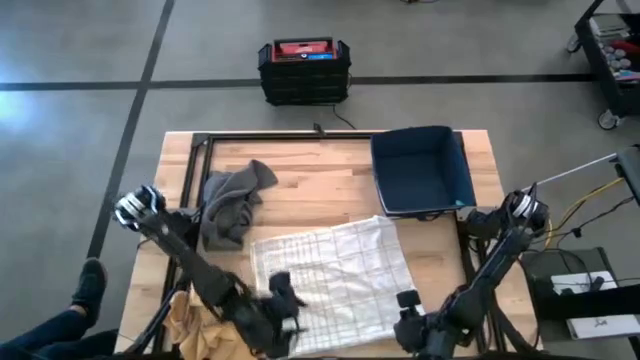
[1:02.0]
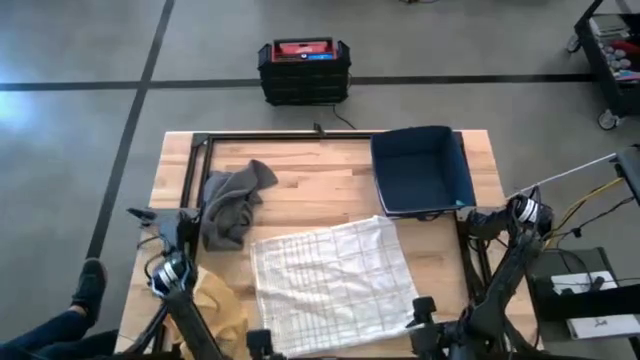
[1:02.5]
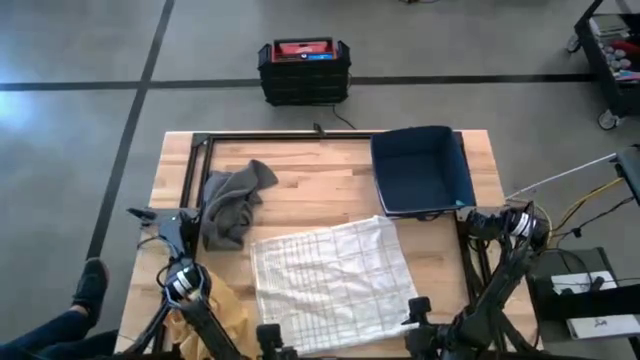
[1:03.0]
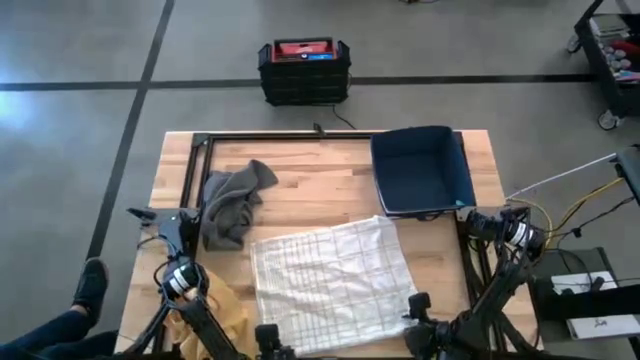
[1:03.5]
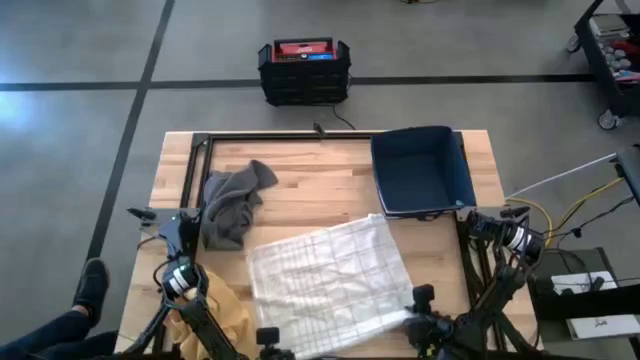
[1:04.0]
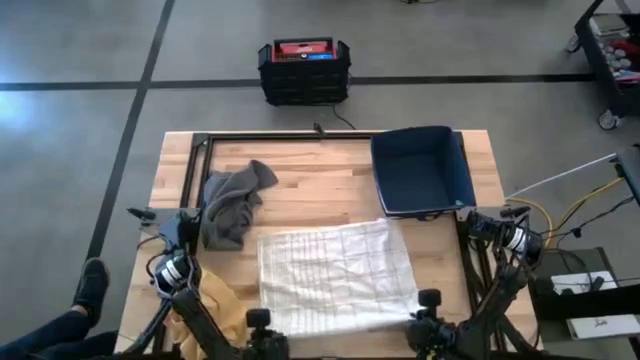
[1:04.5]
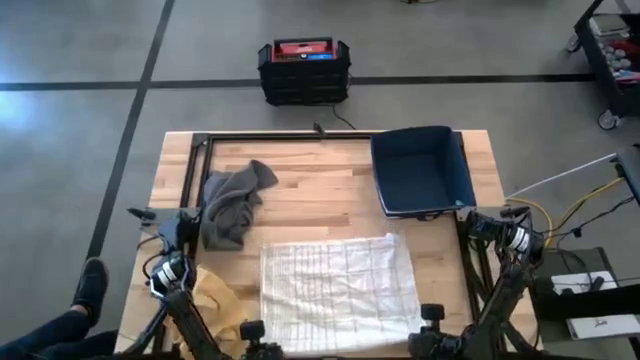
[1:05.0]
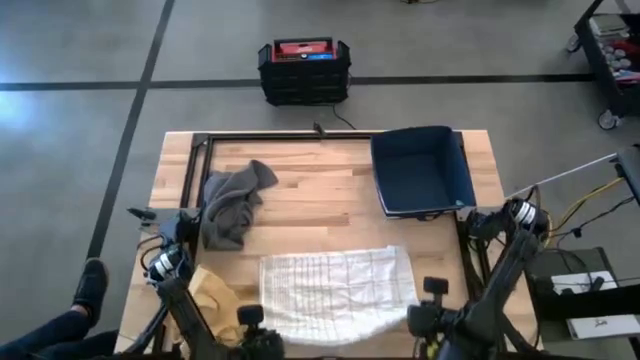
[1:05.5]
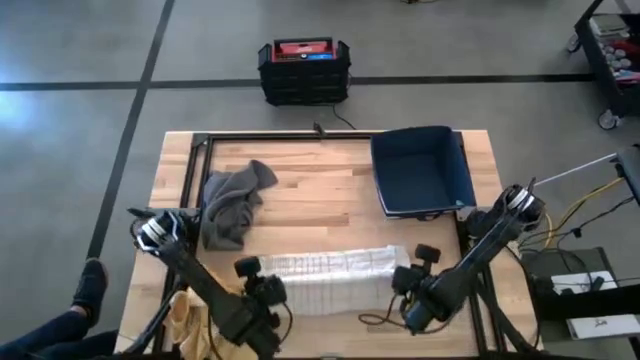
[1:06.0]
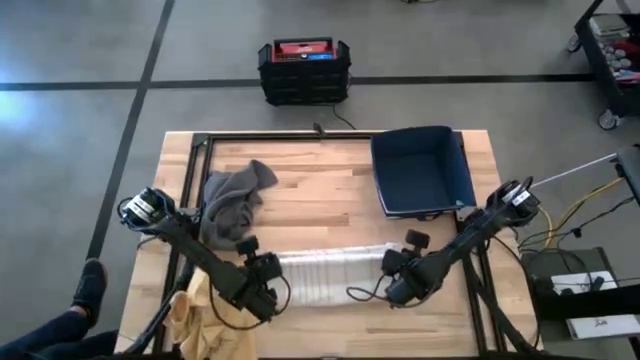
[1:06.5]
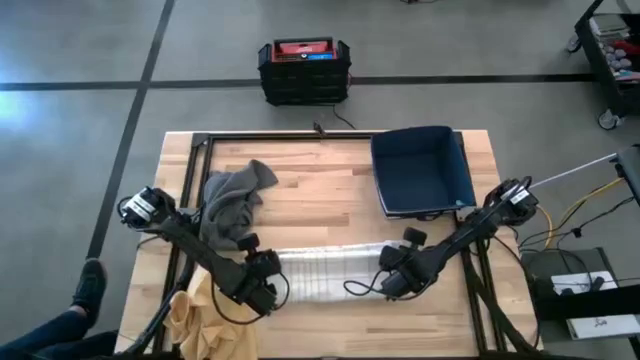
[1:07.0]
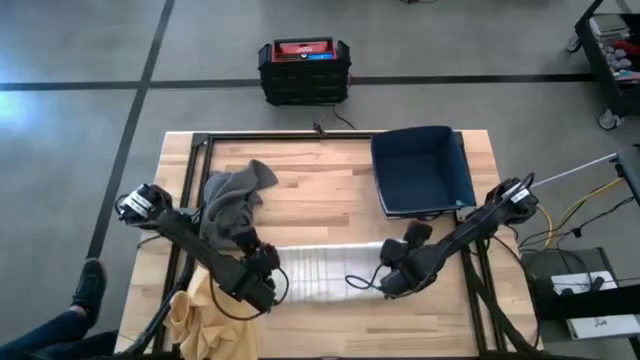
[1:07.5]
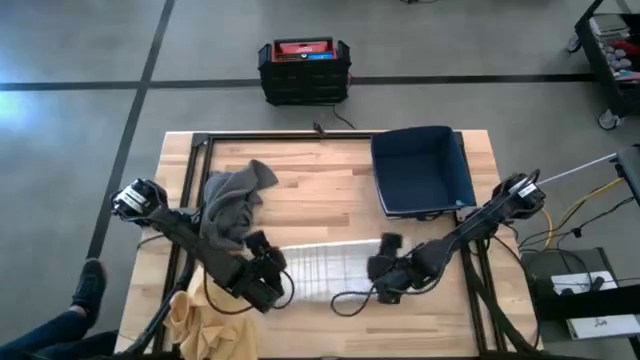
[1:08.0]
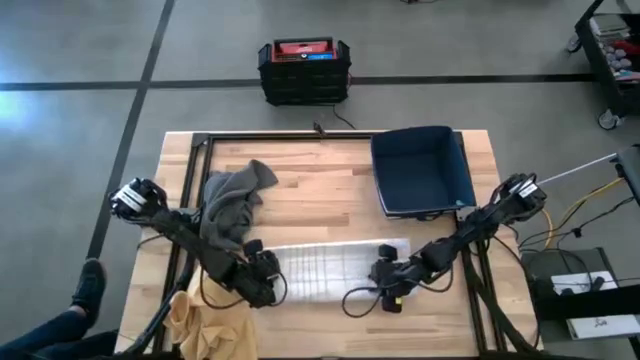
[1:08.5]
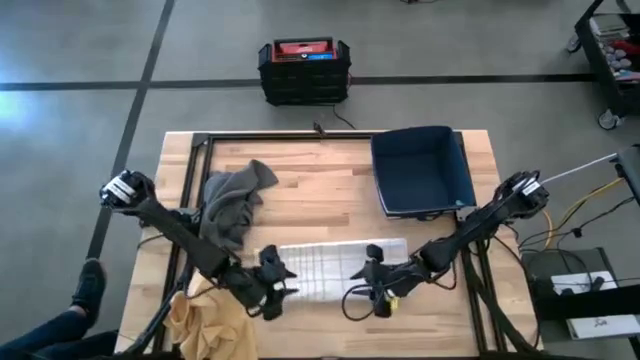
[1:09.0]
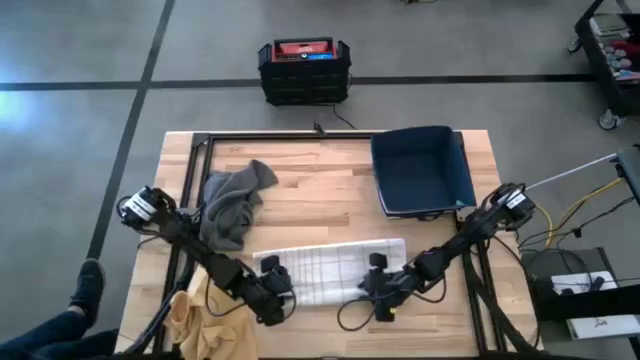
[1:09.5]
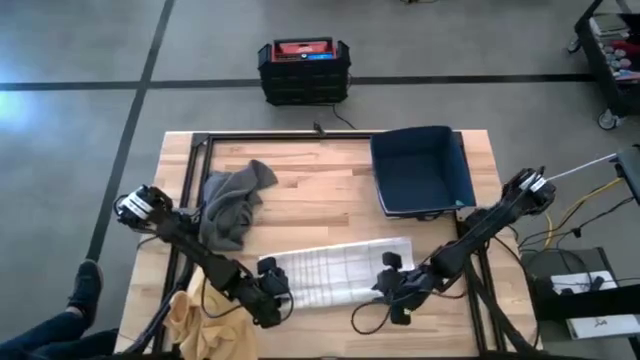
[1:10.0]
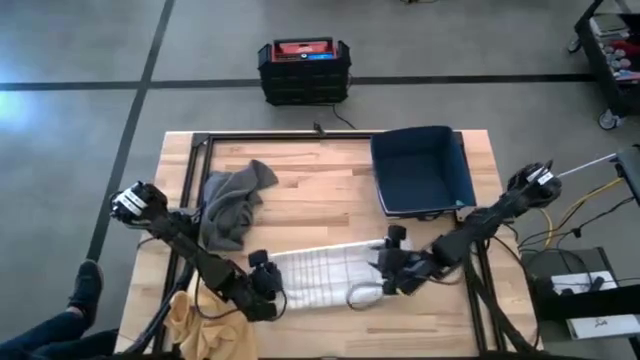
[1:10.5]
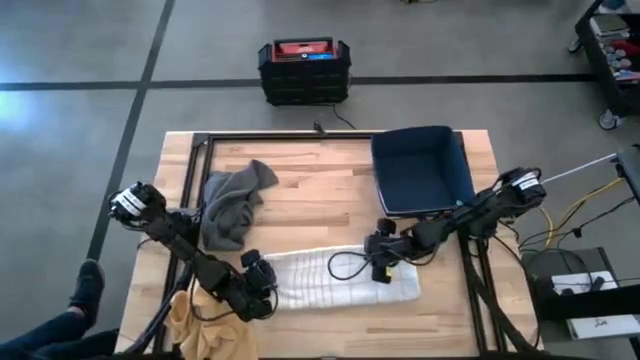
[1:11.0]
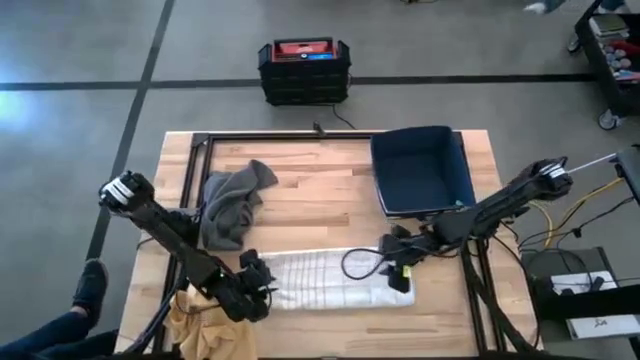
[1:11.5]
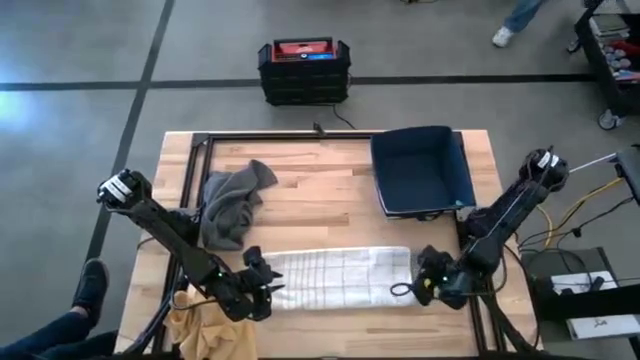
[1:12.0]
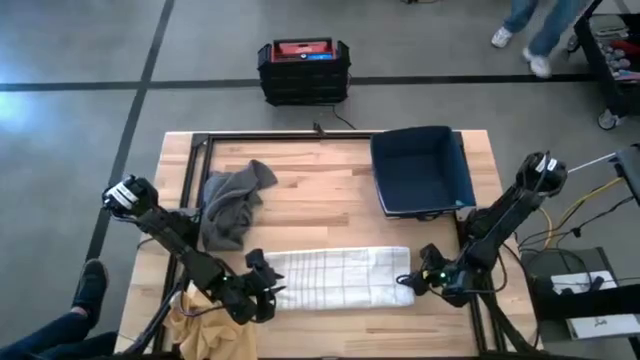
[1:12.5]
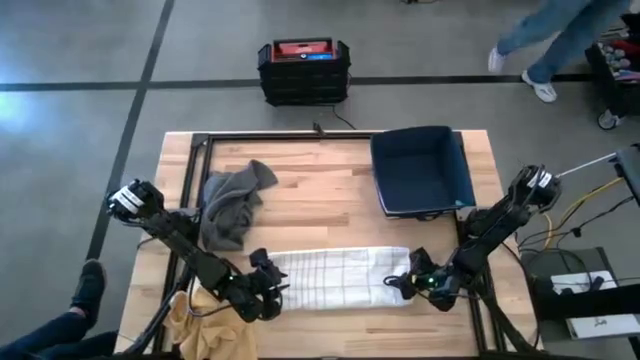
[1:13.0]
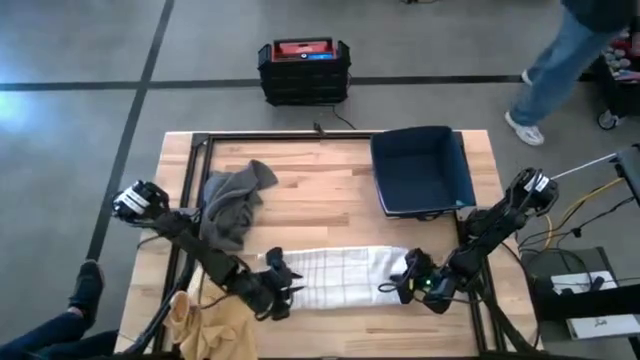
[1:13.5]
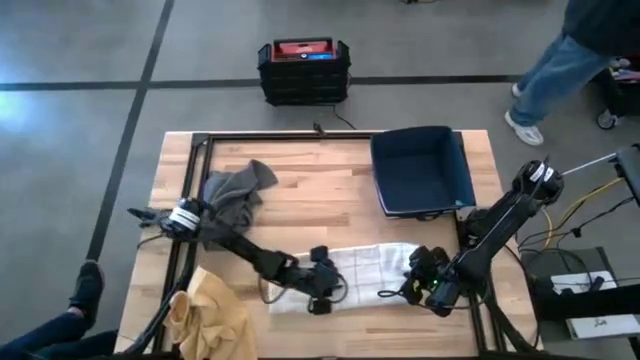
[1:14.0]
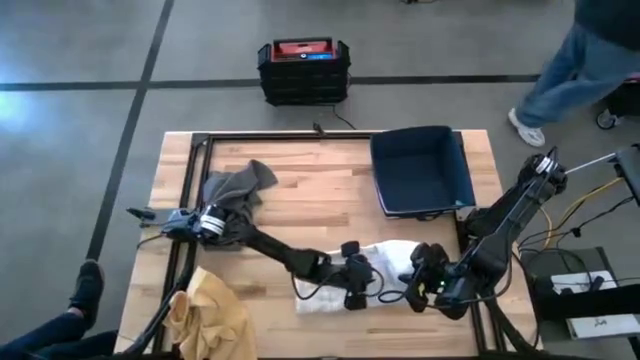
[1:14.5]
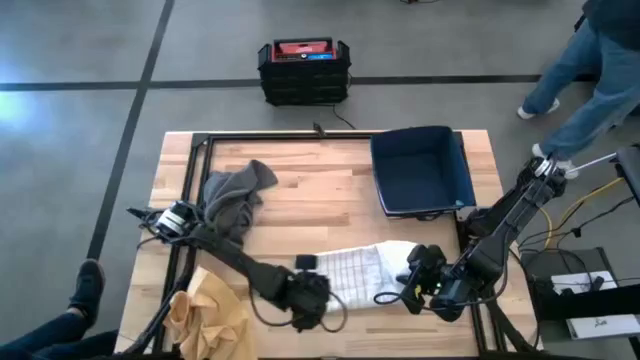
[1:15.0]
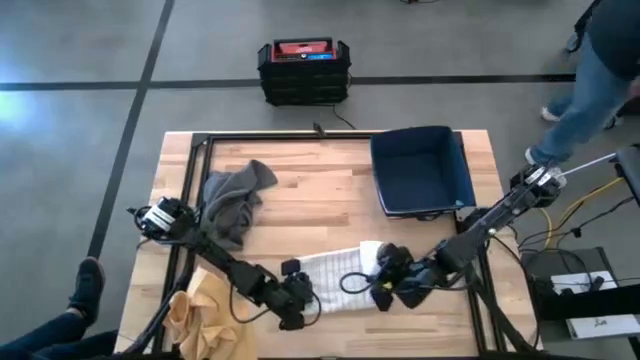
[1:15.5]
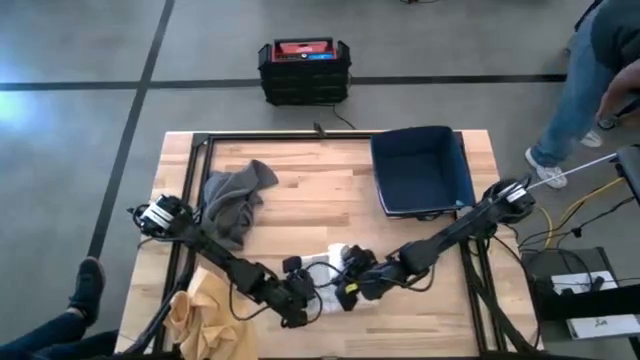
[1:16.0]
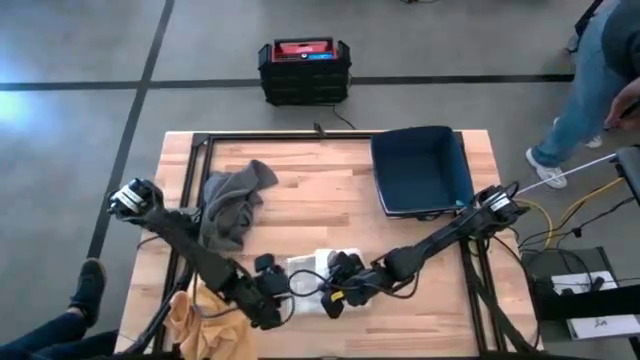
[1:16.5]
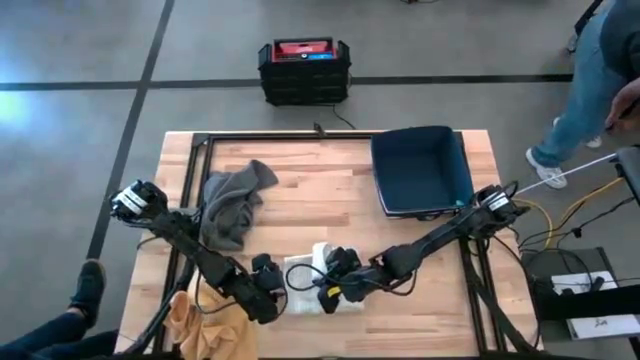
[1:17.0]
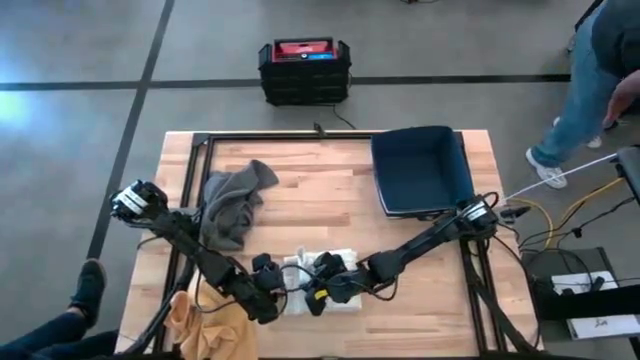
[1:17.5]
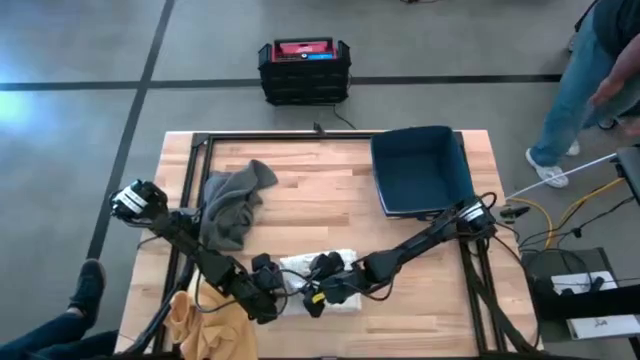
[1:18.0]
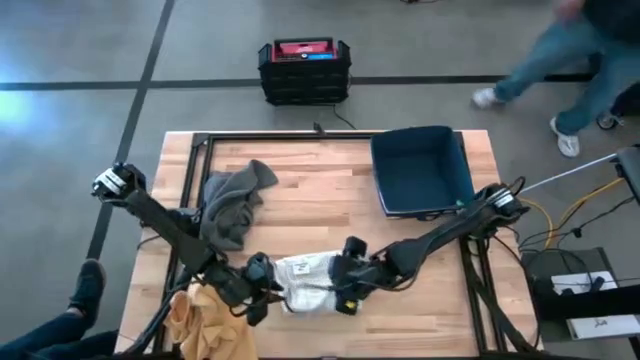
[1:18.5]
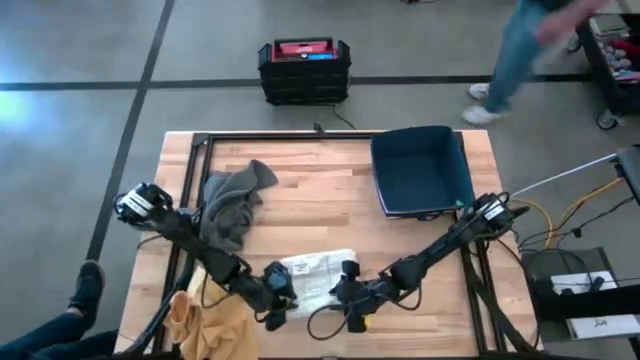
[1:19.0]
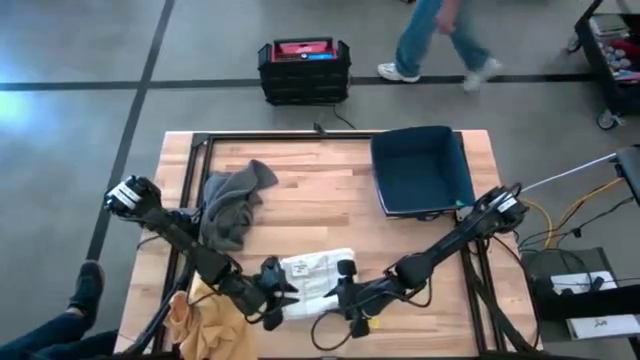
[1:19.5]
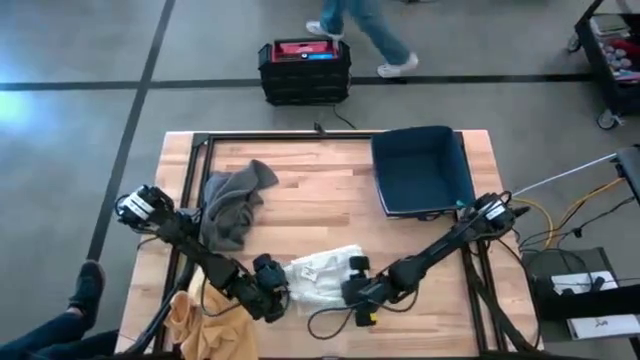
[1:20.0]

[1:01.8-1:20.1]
Task: Fold towel
Fold the white towel

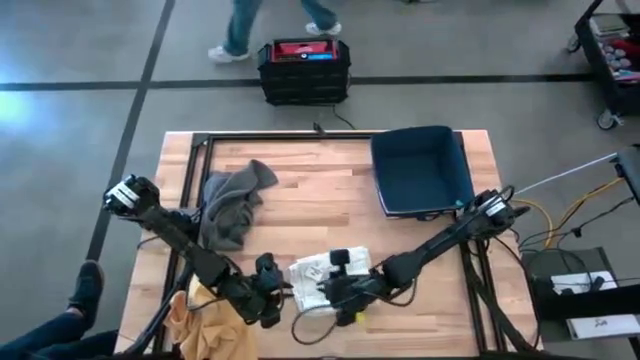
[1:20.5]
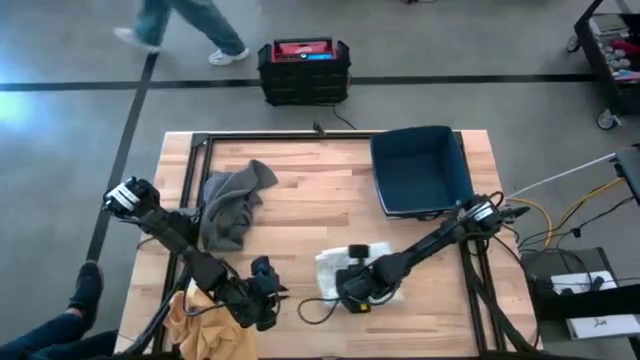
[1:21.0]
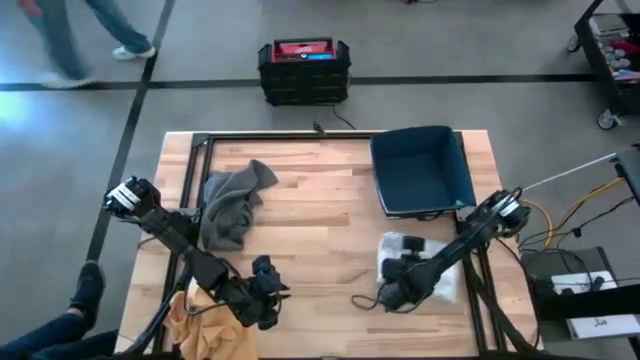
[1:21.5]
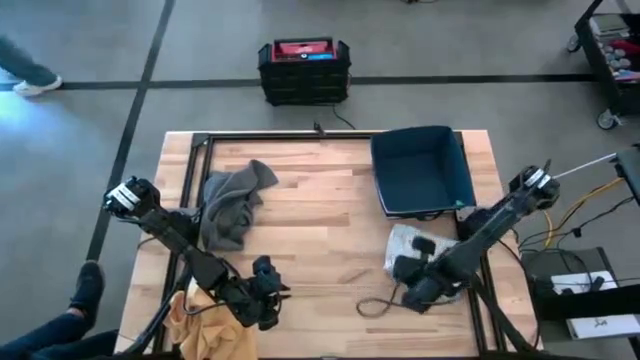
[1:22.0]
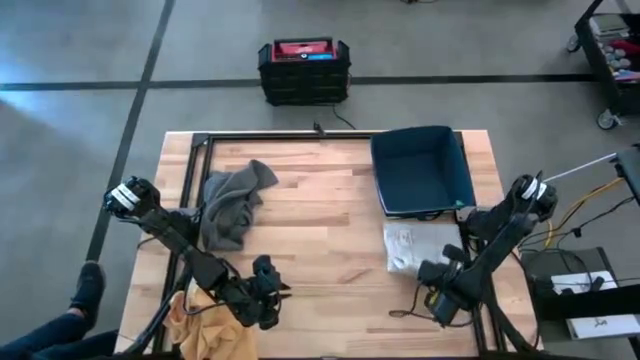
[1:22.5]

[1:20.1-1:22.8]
Move the folded white towel to the bottom of the blue laundry organizer

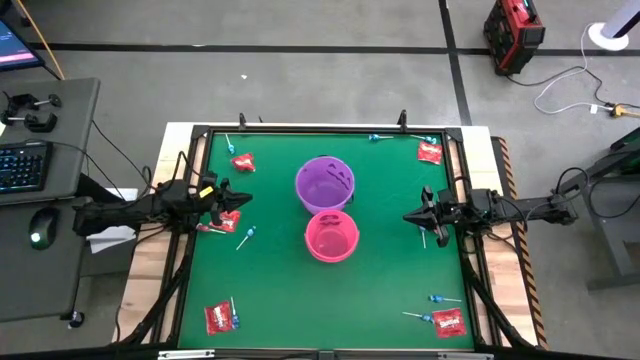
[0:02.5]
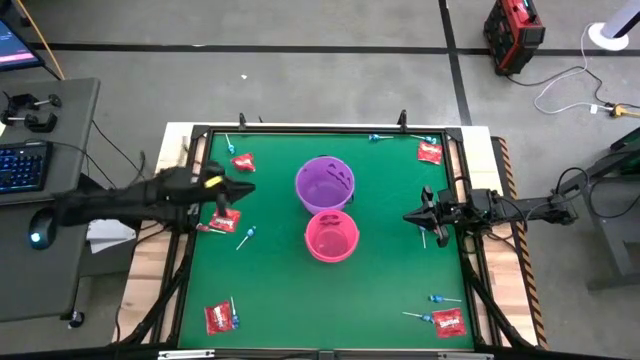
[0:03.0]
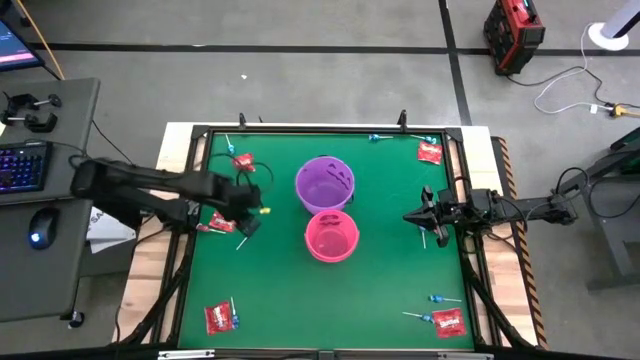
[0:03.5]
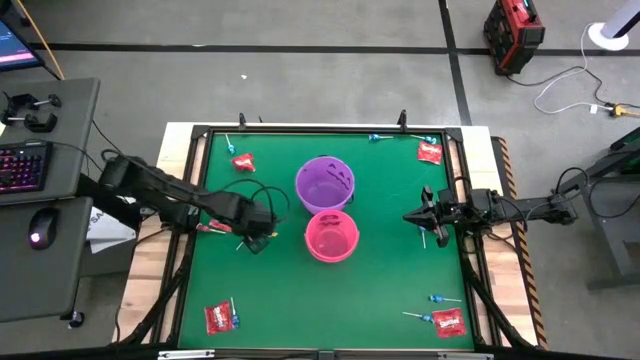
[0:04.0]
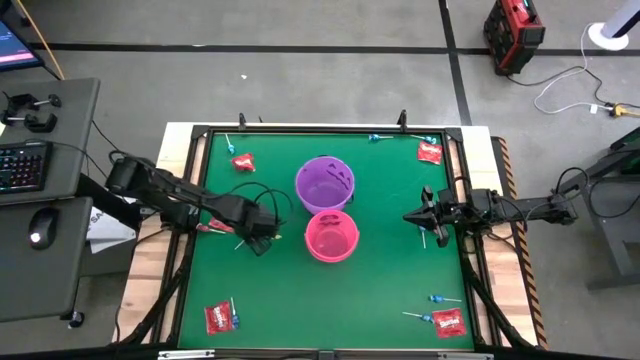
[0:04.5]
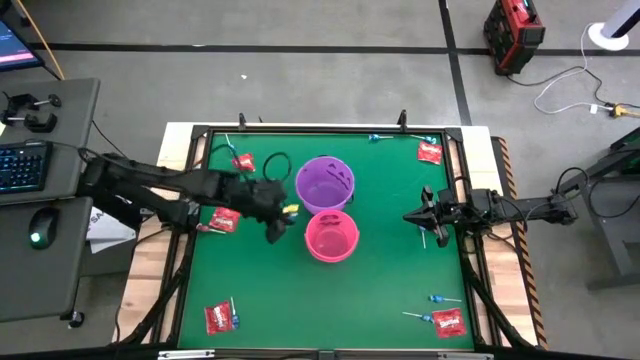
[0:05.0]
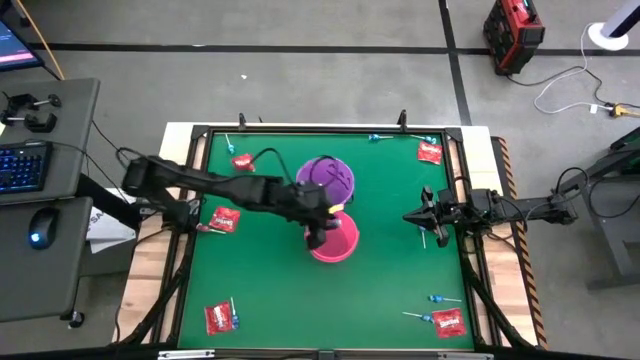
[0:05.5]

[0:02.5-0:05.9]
Task: Sort candy by brand, put in halloween buckets
Put the blue candy into the pink bucket
